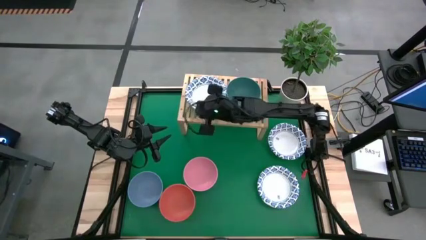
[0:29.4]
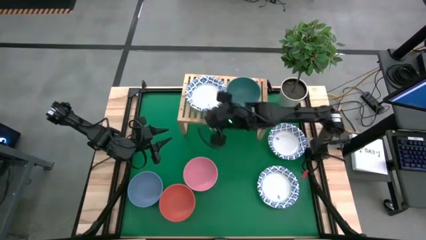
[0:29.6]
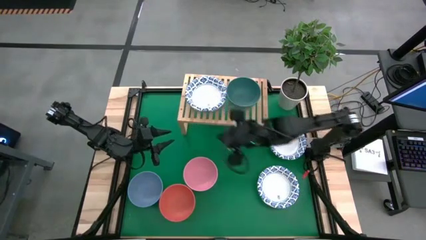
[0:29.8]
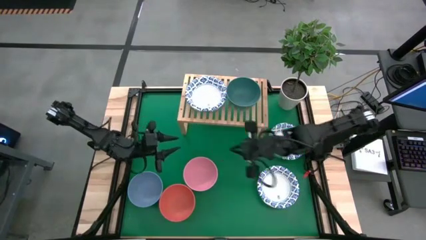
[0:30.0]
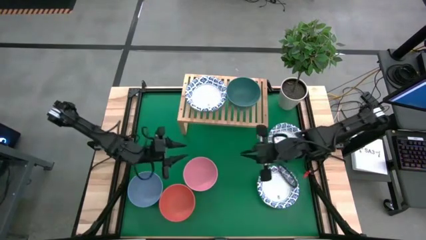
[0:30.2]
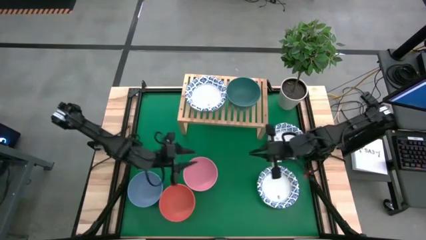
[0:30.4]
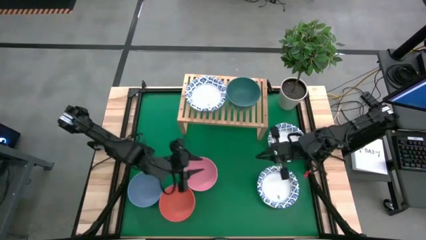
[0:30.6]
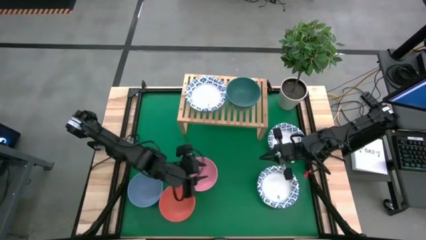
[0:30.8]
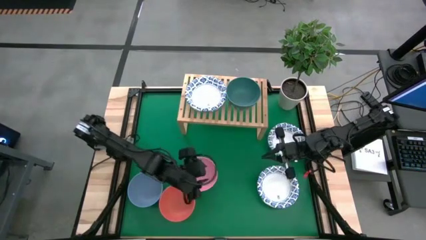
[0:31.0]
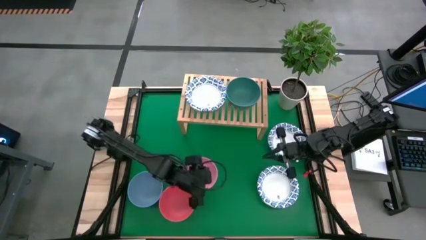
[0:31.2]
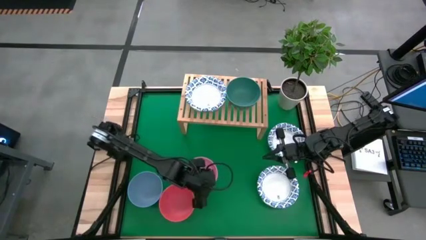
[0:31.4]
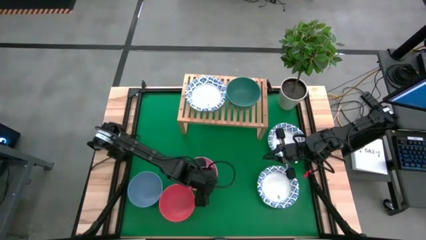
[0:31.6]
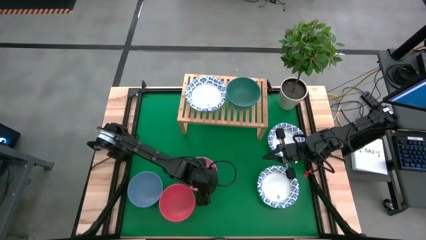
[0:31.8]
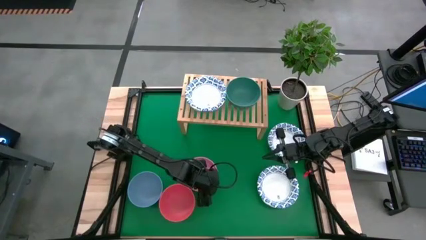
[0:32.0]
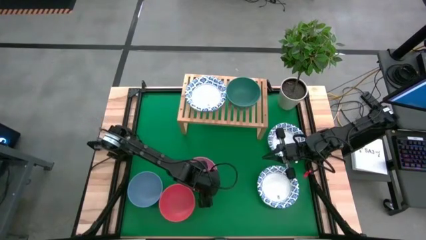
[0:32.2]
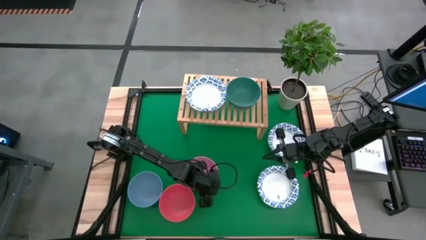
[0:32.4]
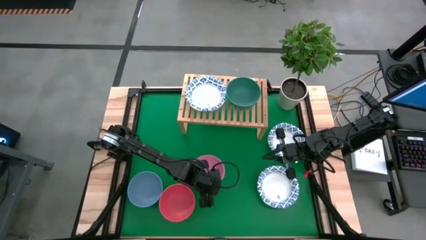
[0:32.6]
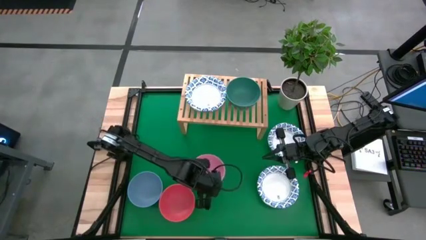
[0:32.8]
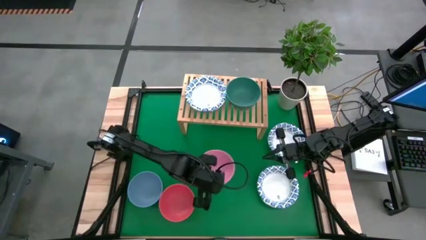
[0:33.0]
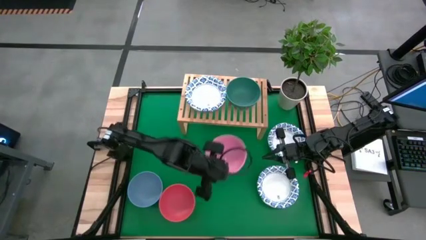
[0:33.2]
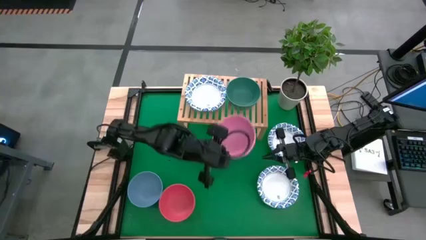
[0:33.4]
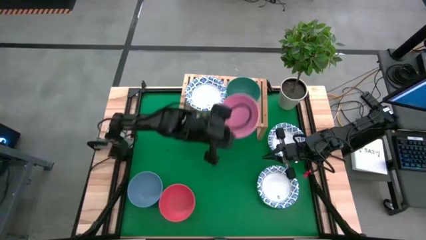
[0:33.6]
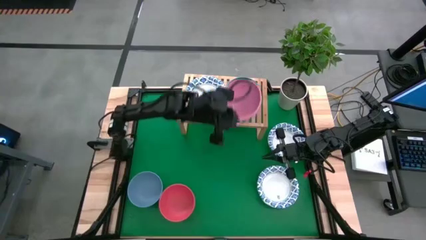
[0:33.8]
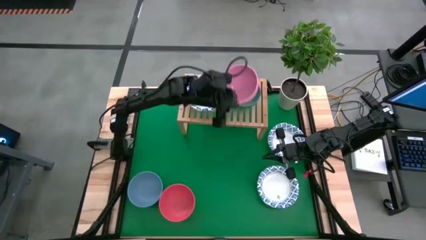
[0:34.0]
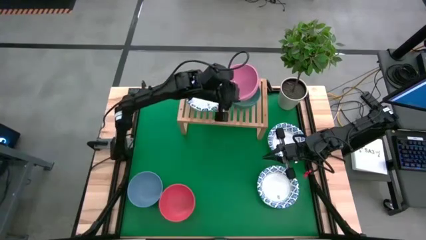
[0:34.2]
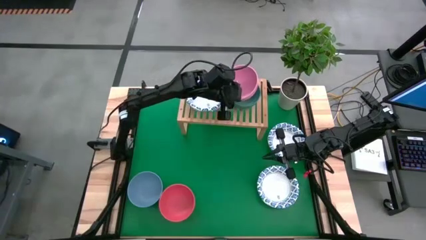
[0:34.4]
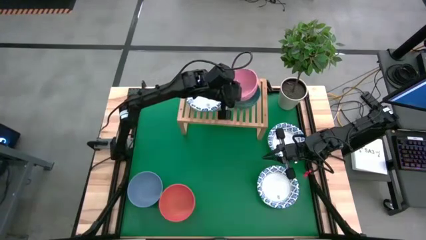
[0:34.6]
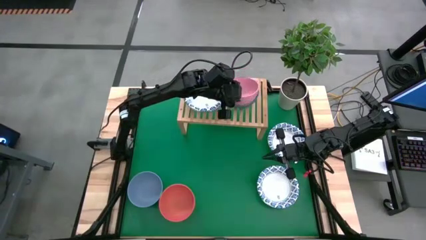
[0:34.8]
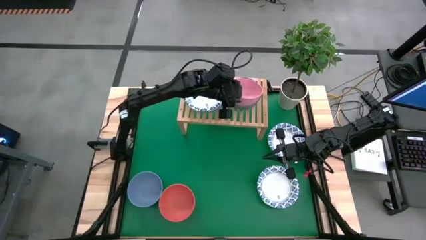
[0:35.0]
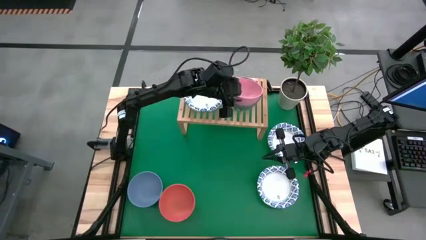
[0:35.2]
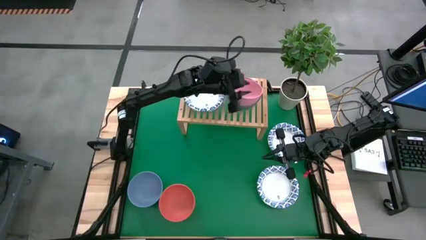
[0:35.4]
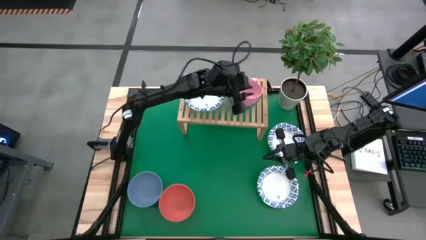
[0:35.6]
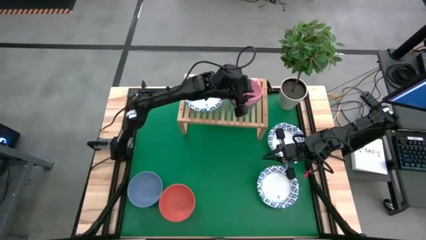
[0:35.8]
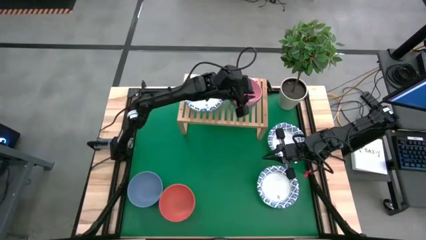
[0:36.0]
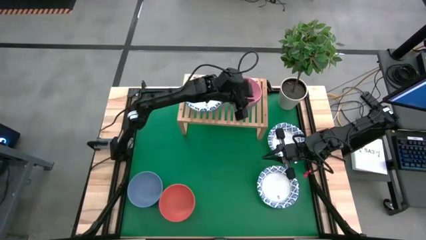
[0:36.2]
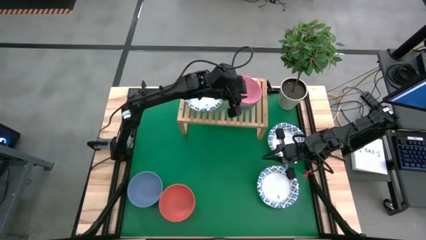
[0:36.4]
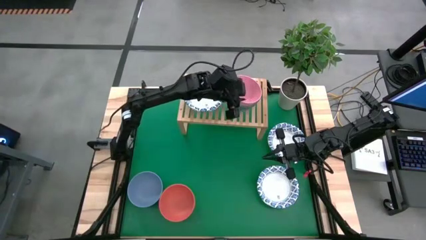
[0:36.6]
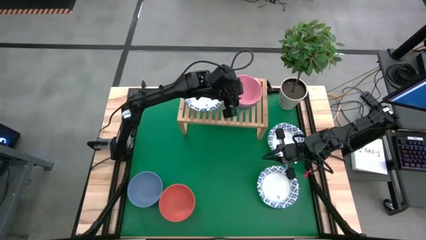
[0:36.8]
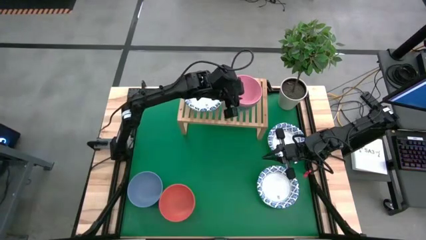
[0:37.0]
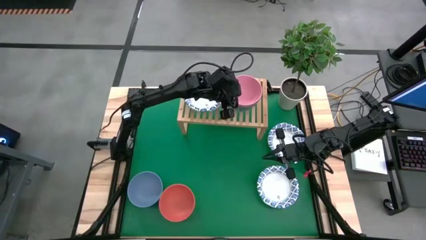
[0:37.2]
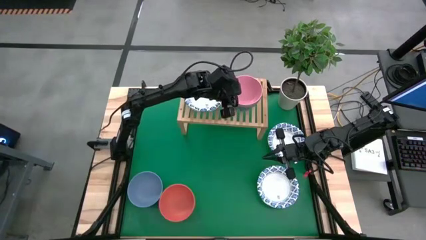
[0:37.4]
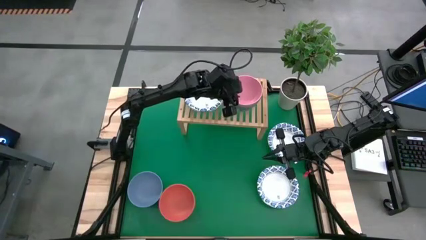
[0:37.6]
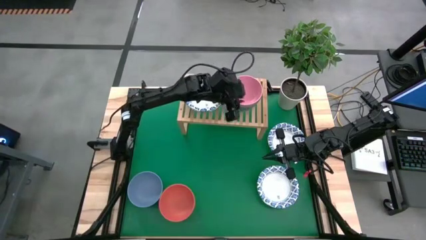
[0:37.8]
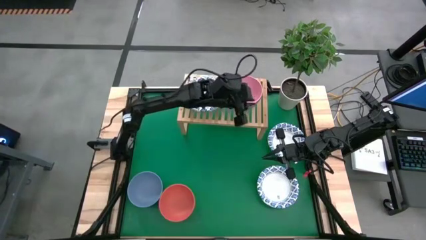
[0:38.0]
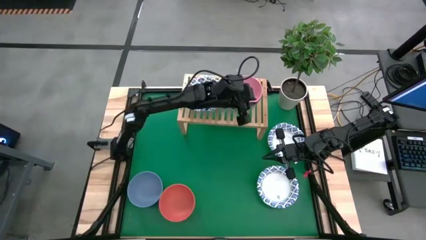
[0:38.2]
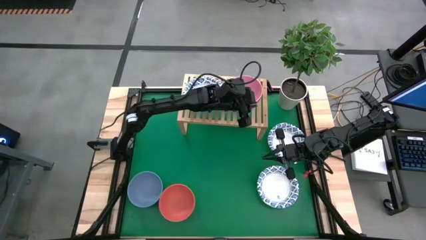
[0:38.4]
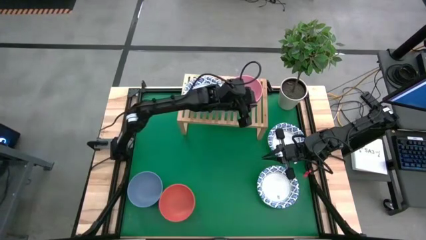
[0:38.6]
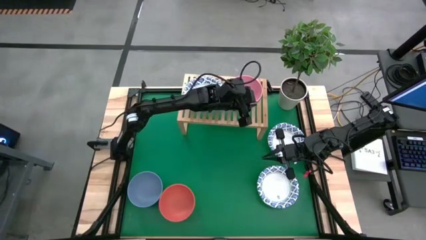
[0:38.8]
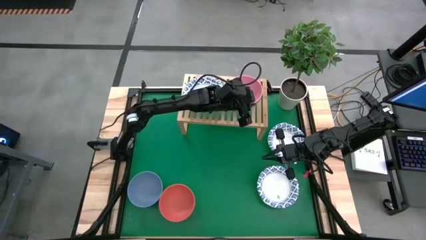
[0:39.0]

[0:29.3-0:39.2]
Task: Place and stack bowls onto a shelf
Stack the pink bowl on top of the green bowl on the shelf

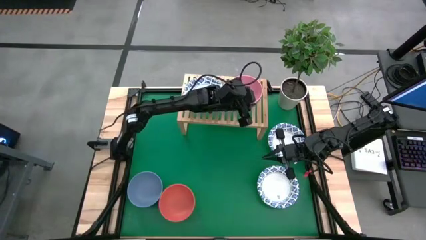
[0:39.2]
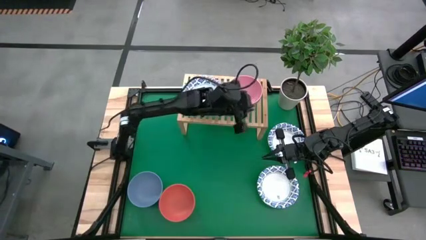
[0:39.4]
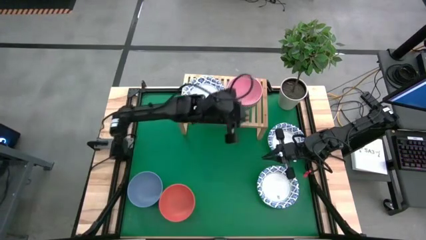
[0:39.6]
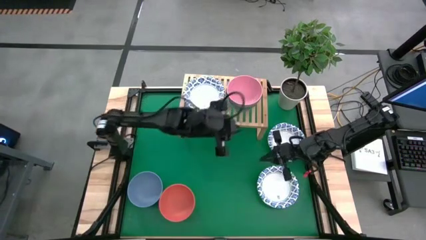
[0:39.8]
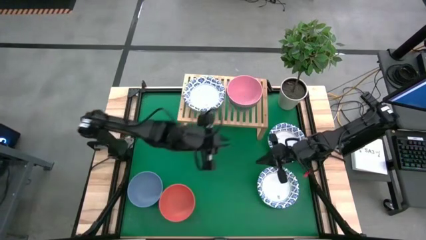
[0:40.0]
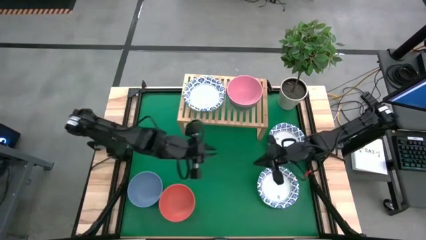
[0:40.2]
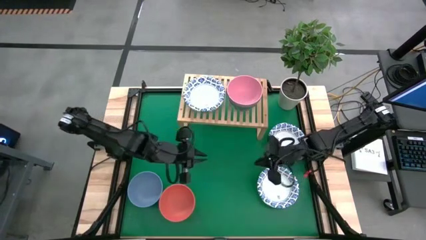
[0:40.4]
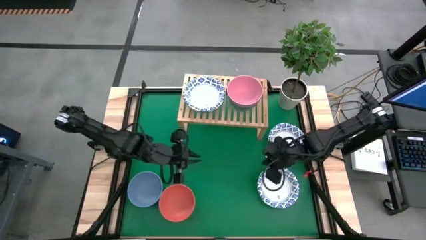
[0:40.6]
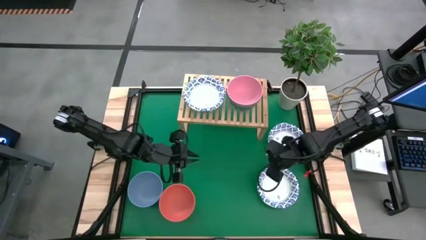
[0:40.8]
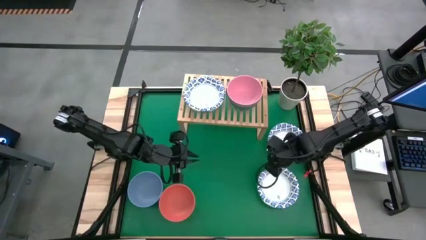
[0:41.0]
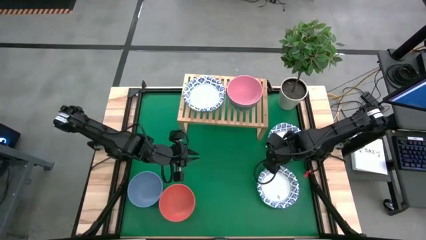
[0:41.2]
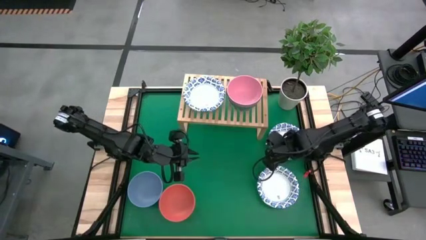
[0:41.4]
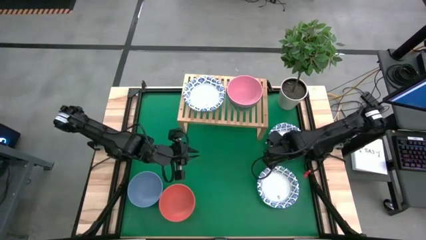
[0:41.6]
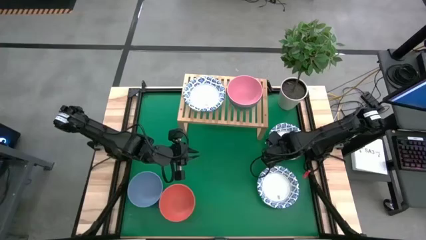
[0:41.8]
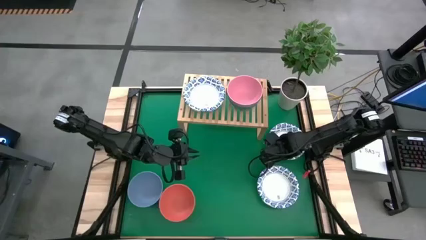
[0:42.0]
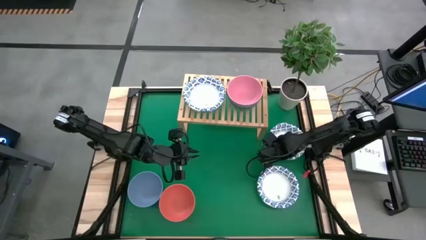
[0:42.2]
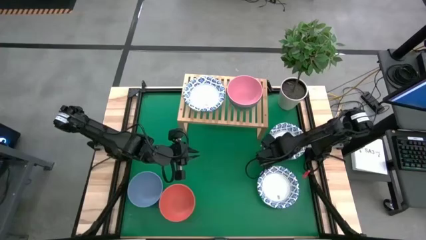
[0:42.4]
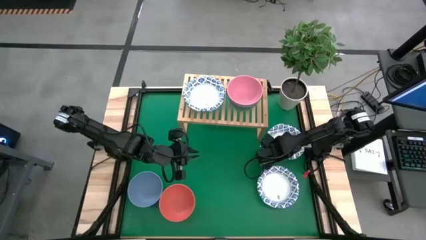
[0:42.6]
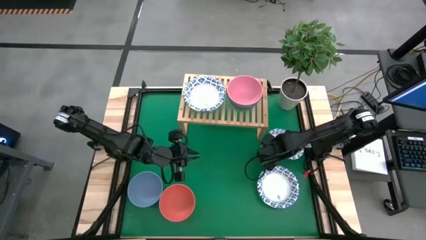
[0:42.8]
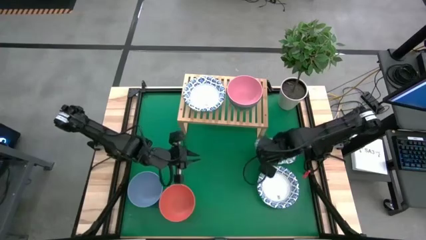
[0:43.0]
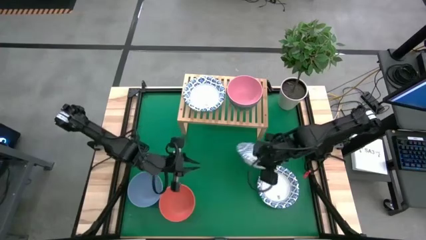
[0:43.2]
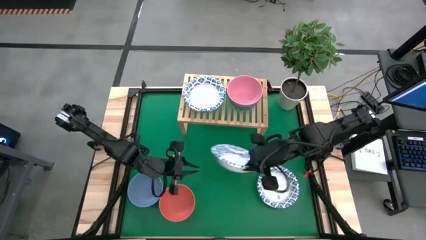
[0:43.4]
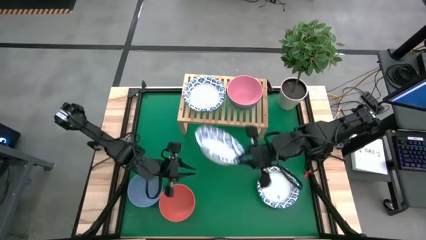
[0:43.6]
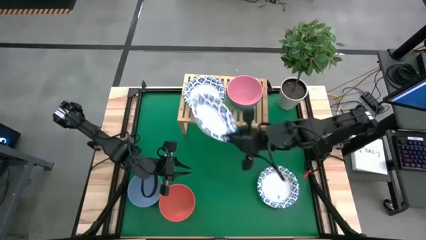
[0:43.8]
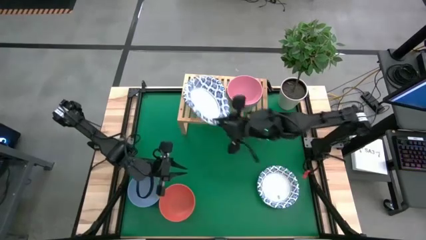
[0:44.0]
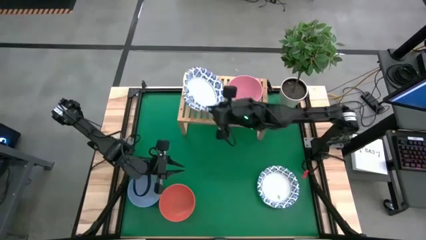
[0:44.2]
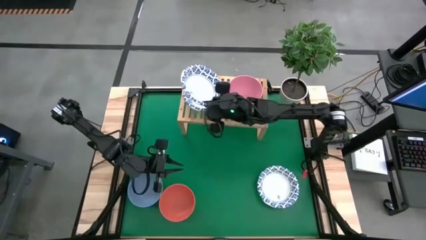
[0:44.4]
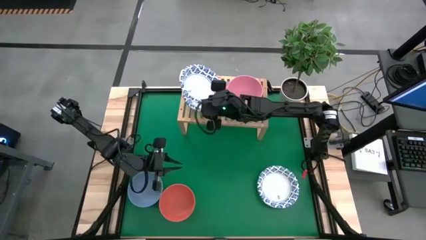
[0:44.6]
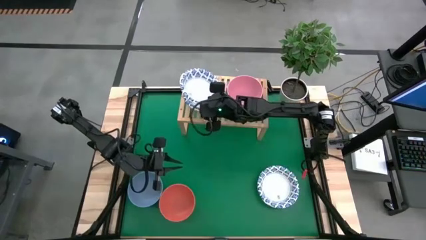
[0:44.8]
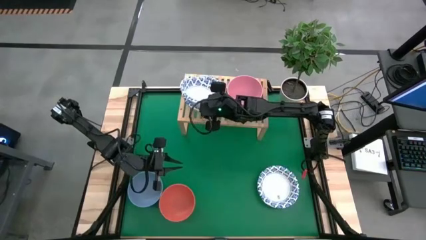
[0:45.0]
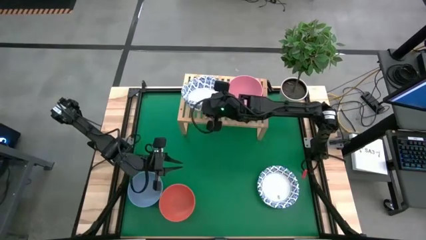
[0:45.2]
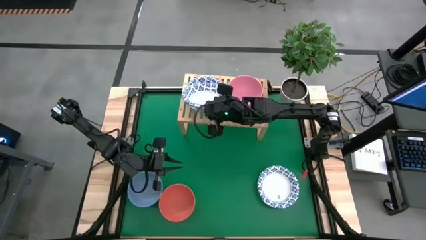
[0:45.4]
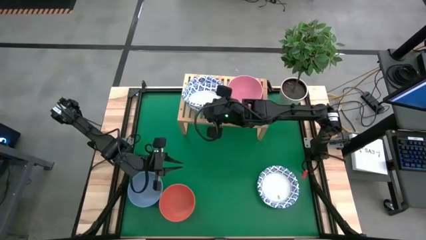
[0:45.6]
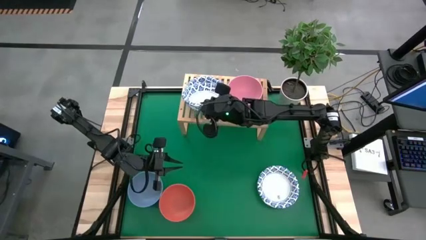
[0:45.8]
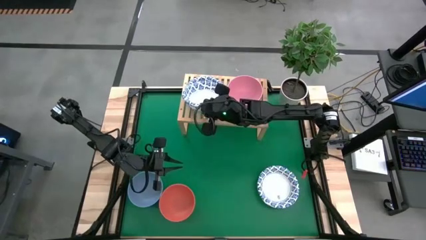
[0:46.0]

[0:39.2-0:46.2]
Stack the white patterned bowl on top of the white patterned bowls on the shelf
